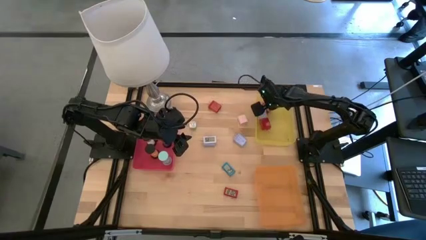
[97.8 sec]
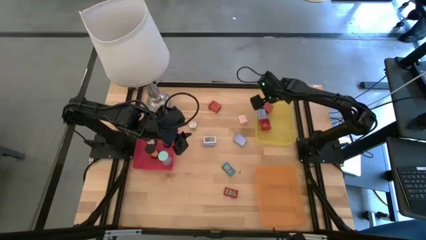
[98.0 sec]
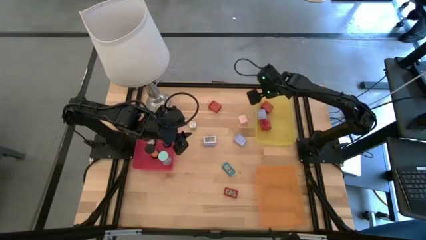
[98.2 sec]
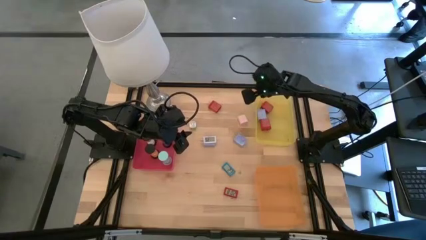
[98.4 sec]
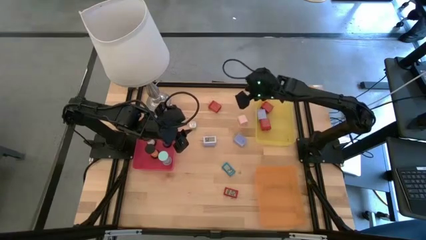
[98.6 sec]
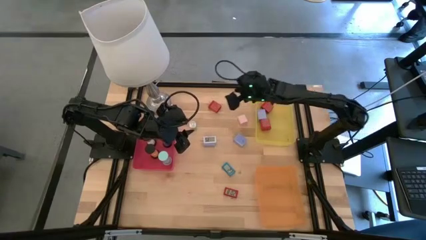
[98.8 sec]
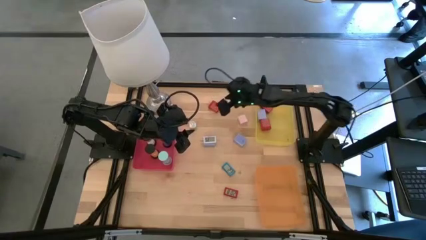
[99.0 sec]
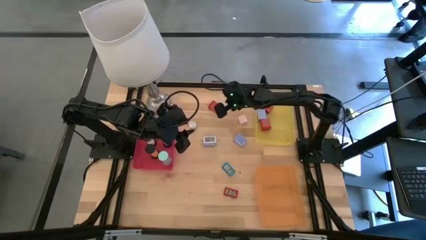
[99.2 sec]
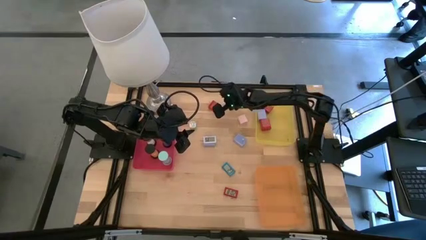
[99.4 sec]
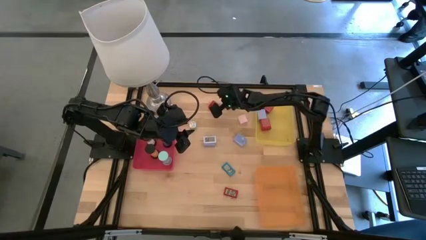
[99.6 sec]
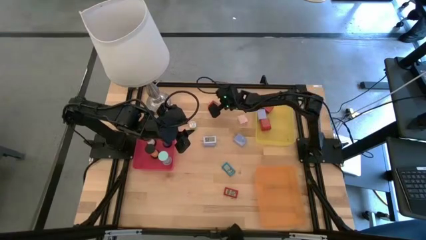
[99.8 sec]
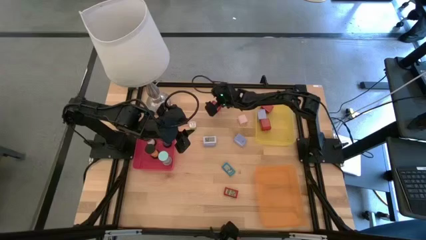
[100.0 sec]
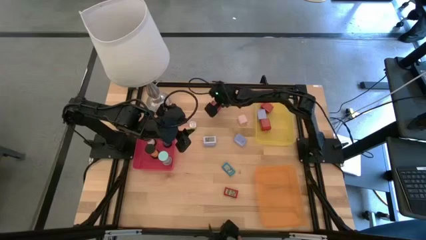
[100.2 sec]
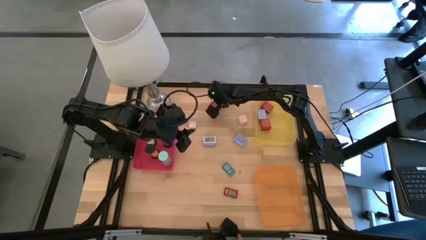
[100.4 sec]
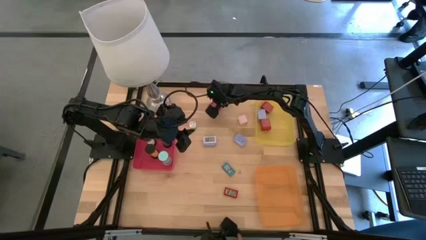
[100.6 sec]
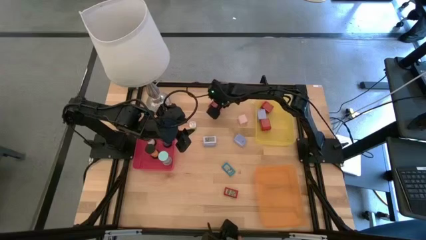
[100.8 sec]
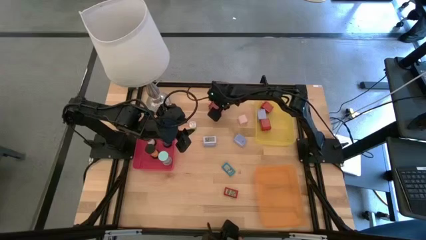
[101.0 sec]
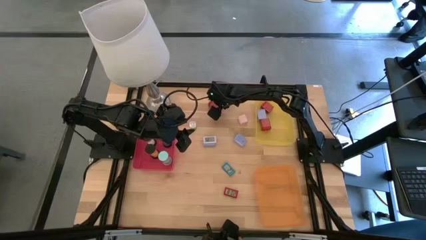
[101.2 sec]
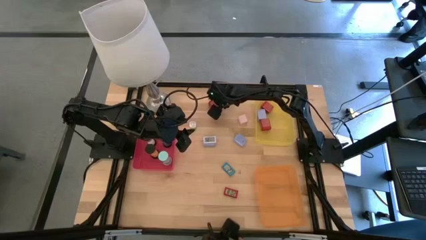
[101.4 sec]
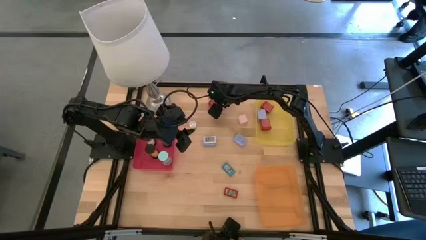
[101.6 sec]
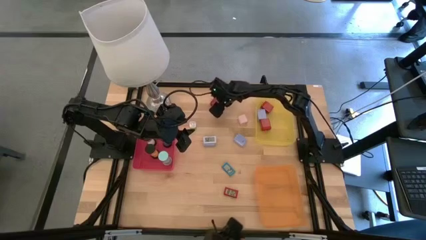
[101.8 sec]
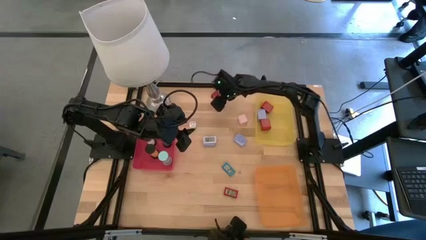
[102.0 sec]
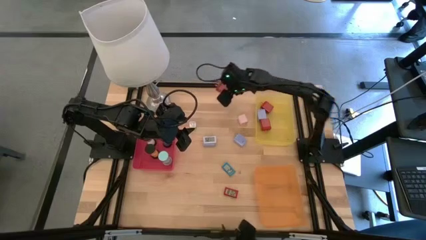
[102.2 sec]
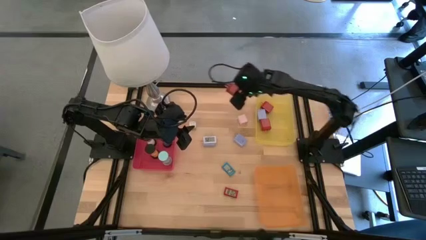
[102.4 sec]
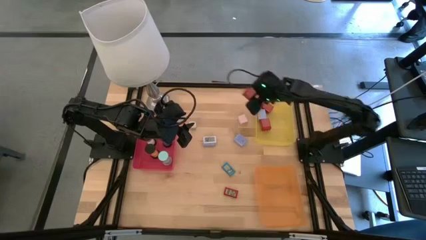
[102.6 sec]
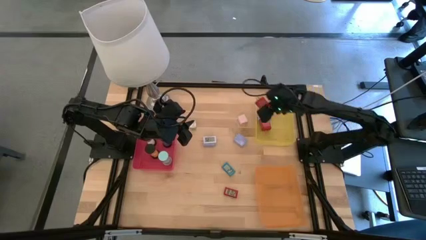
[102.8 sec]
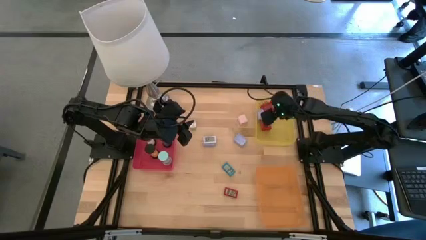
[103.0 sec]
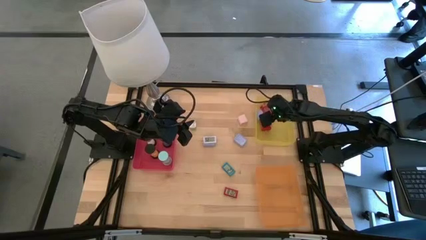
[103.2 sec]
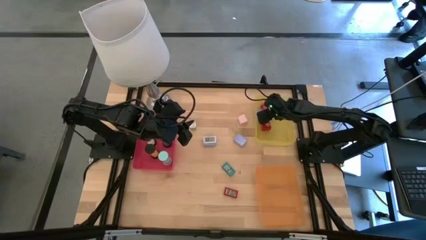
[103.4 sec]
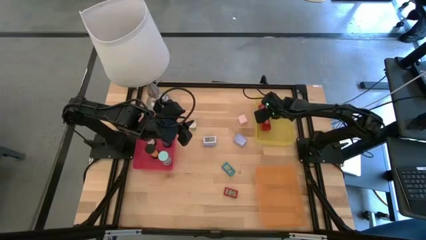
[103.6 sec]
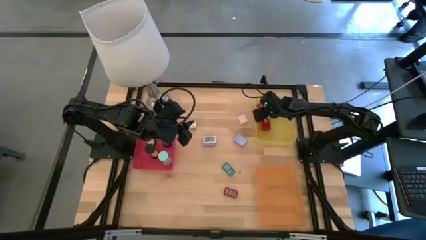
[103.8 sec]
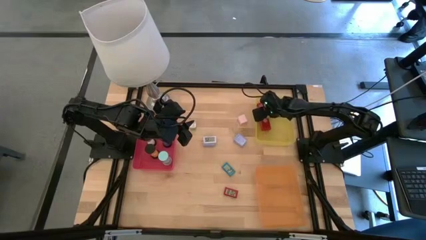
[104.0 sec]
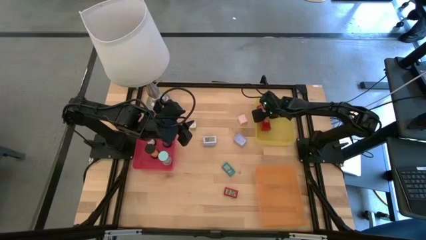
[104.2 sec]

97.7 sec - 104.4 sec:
Task: Pick & Place Office items
Put the red charger adapter into the yellow bin

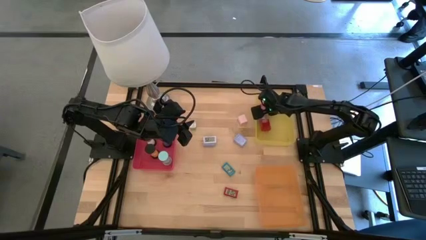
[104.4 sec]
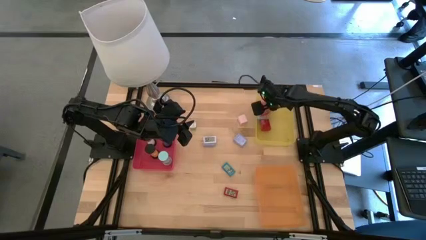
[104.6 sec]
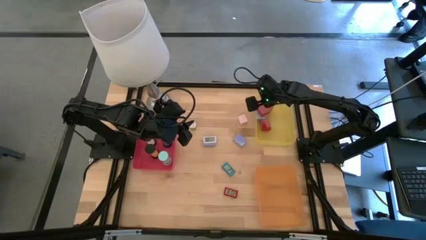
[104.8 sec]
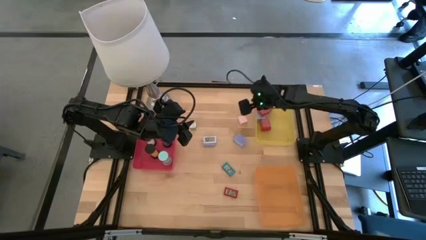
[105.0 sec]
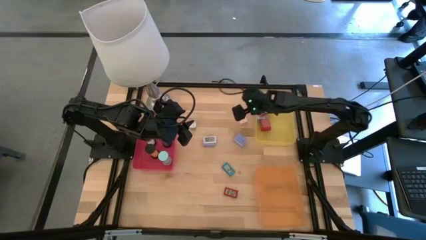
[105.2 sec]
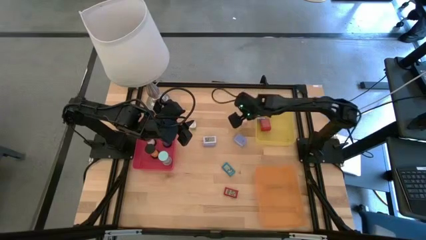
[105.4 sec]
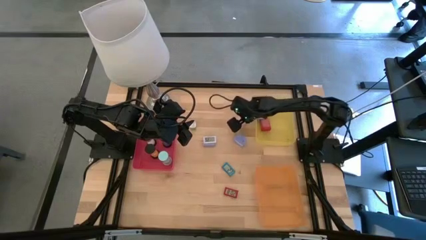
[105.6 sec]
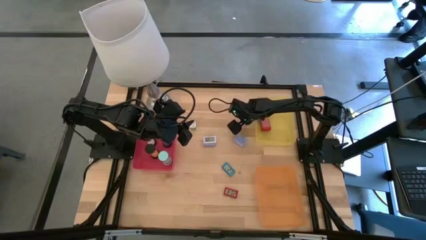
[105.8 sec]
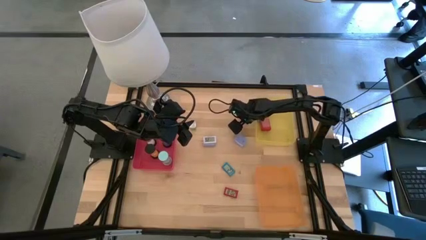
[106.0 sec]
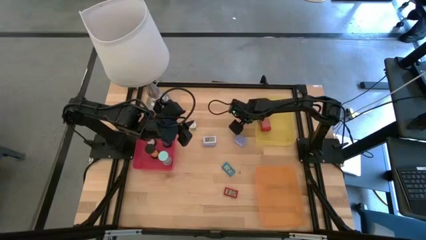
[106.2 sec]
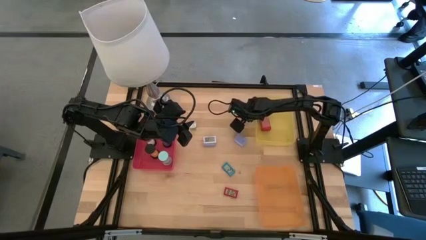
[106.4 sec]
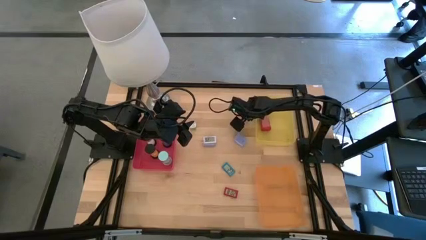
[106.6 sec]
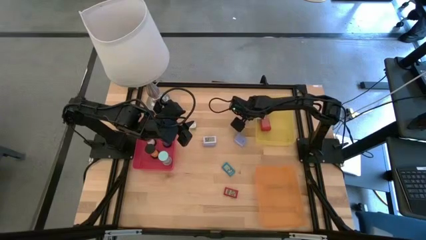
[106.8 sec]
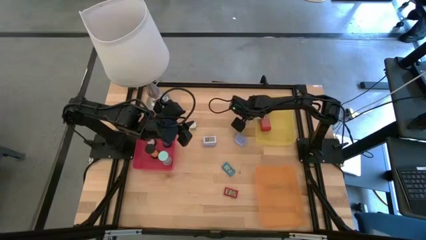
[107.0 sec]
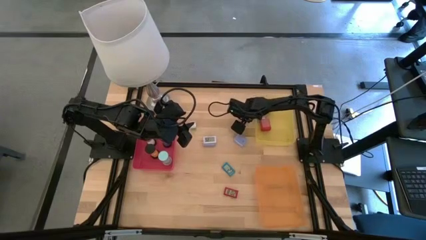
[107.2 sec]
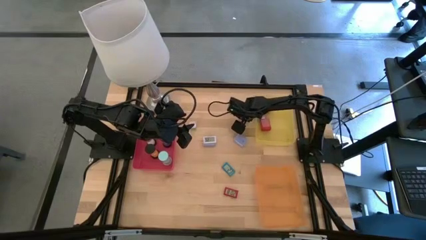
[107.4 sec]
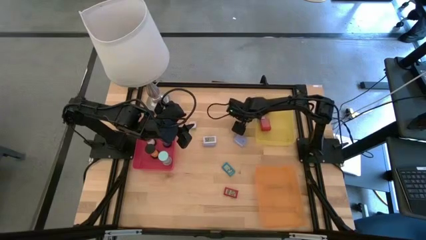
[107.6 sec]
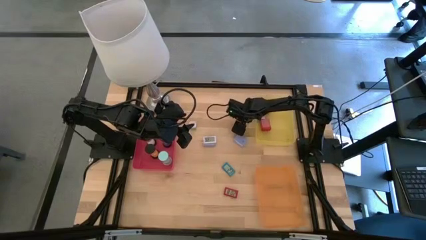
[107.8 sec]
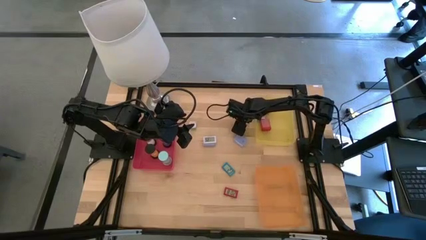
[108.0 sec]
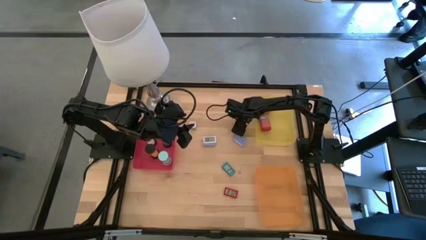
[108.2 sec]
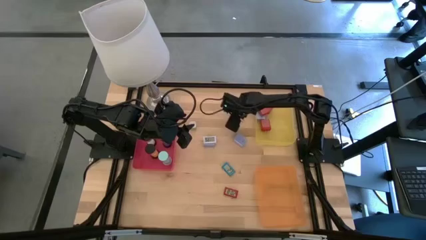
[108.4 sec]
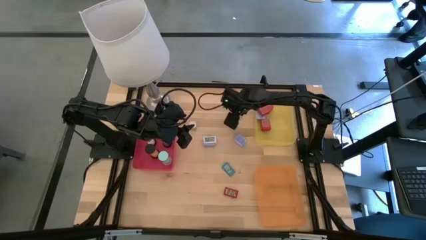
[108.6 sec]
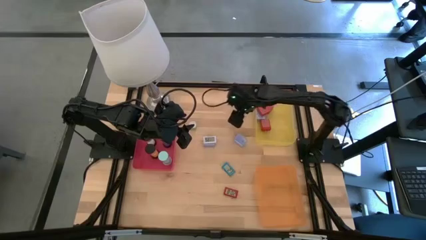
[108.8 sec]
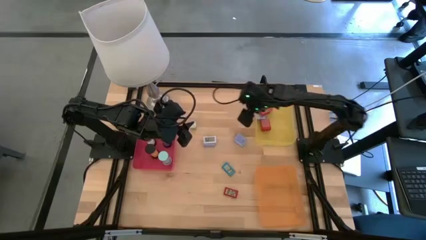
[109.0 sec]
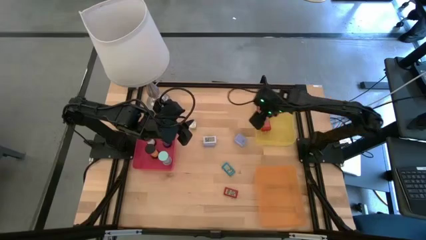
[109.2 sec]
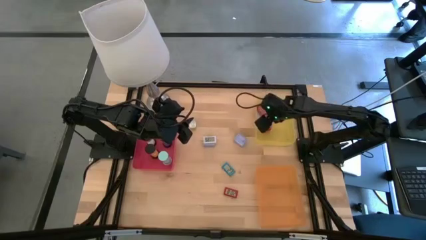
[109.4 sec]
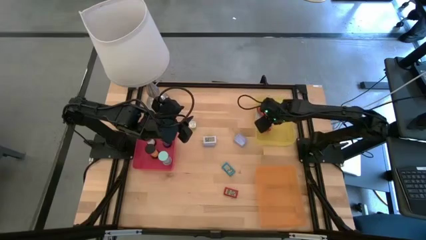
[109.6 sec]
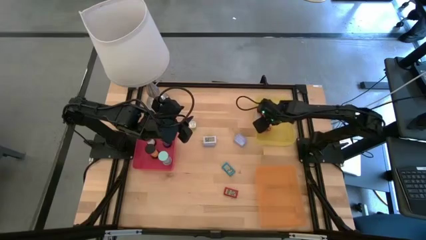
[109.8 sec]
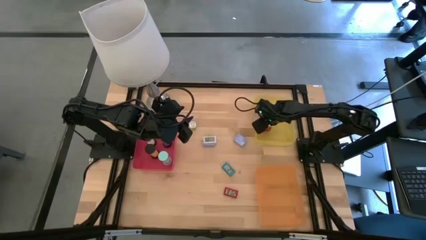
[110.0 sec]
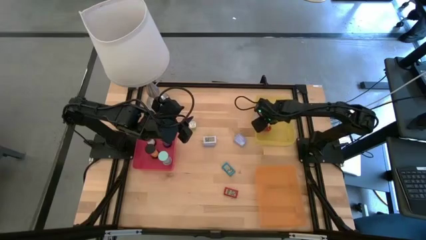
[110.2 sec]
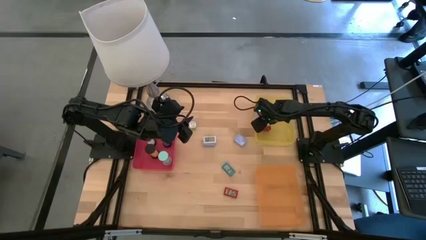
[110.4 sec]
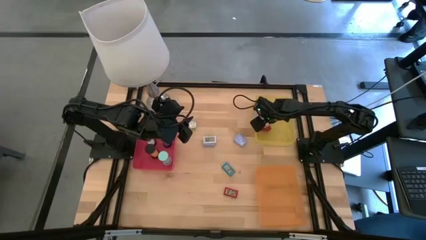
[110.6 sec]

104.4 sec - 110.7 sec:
Put the white charger adapter into the yellow bin

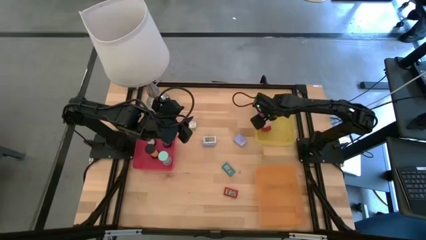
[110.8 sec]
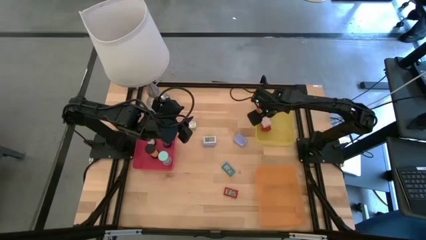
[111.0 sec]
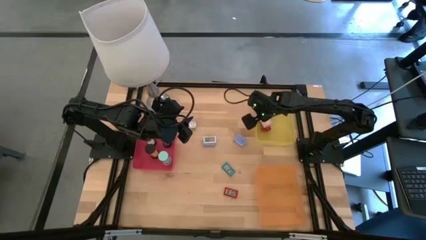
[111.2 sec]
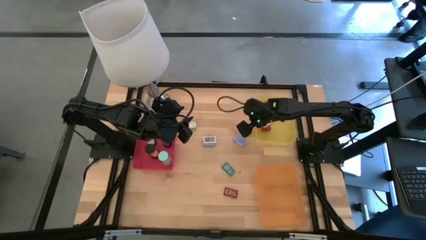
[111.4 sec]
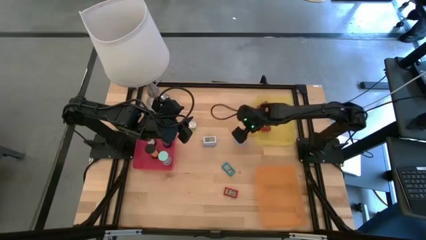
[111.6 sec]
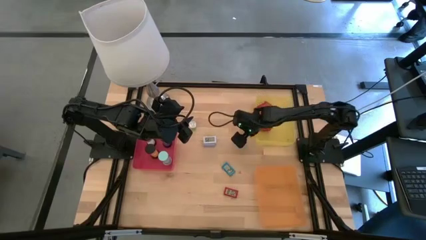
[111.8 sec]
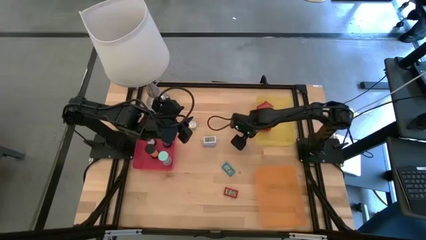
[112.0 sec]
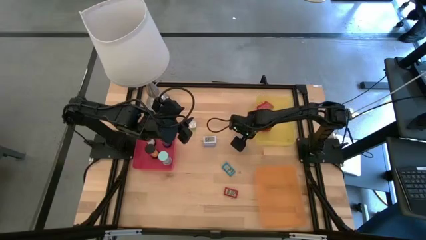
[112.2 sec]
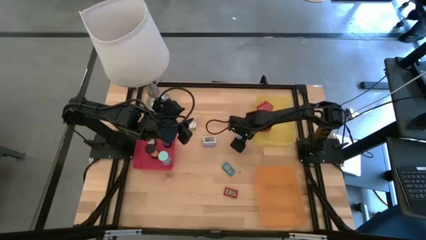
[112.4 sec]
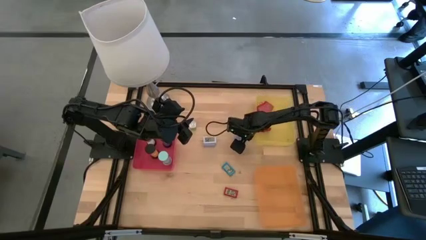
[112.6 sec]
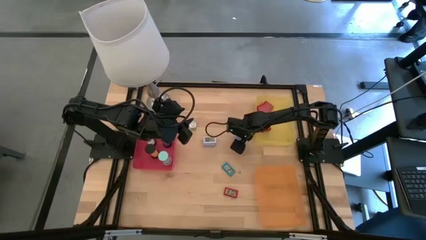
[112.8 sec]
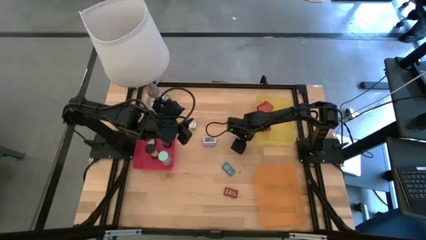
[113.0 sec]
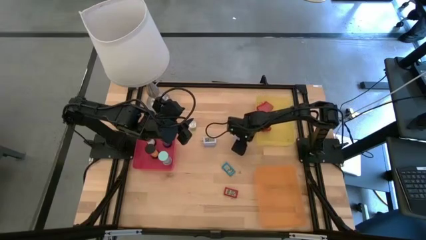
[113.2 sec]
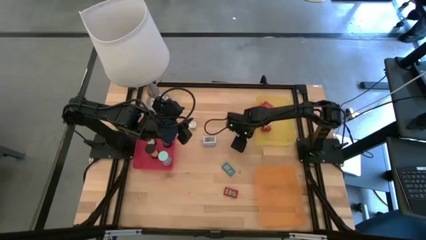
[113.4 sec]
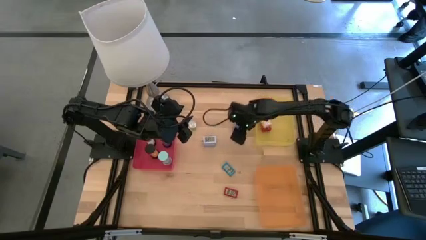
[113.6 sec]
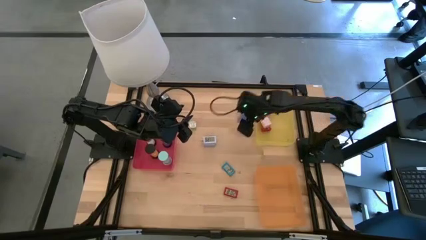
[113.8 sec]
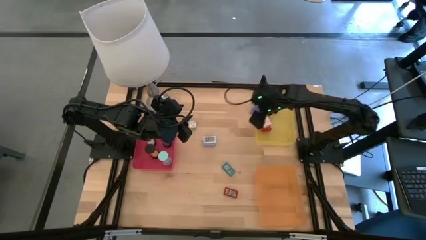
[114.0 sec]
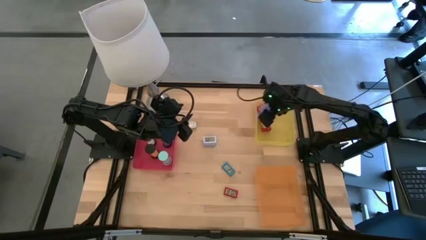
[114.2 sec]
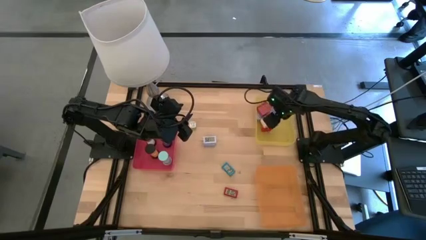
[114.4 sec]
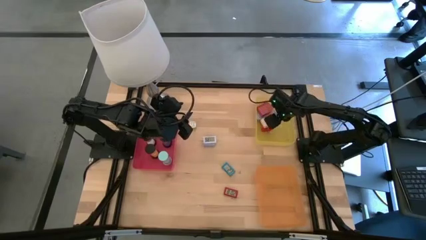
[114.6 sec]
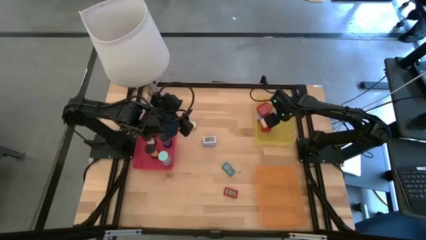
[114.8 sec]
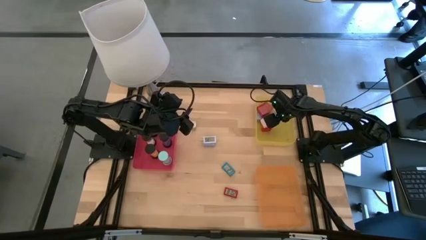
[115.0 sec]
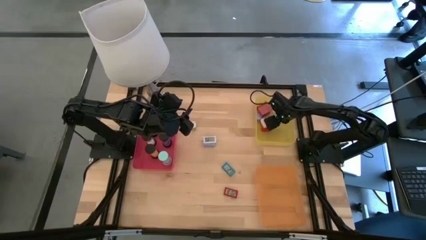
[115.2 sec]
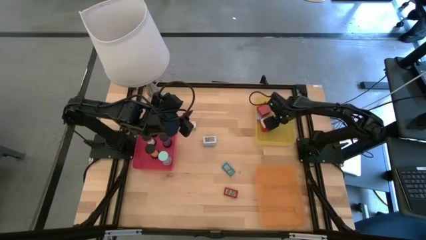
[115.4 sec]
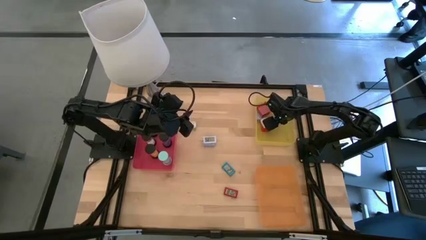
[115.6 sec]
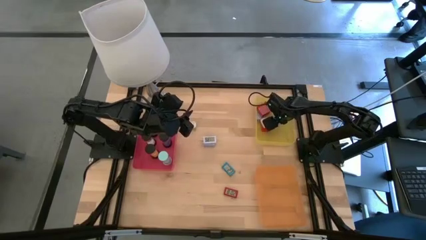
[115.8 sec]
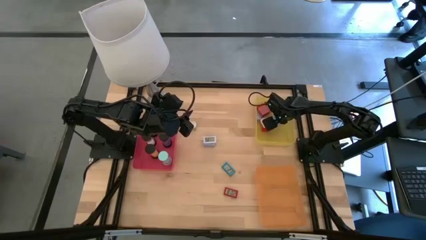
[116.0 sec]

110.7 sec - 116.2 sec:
Put the right blue charger adapter into the yellow bin
